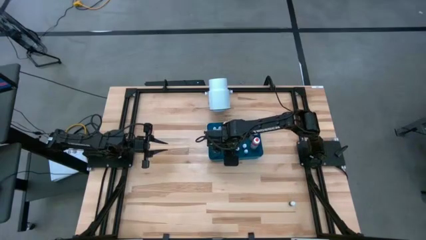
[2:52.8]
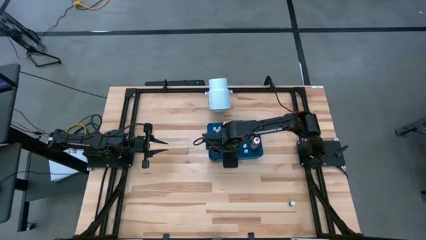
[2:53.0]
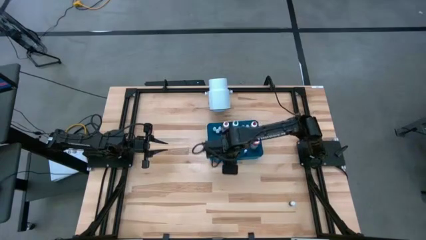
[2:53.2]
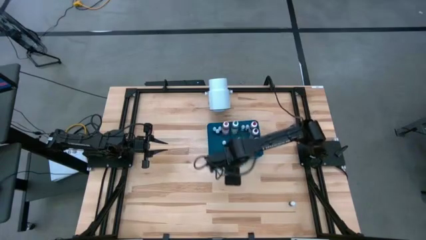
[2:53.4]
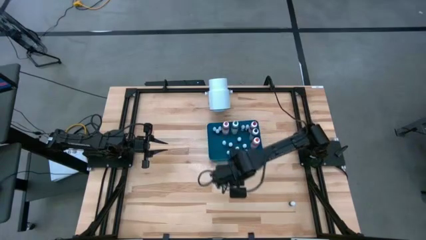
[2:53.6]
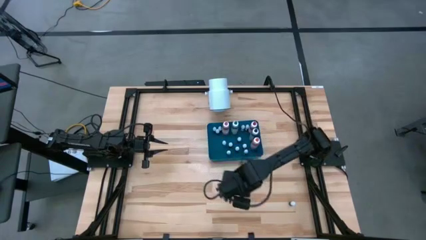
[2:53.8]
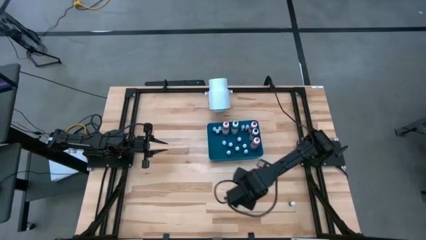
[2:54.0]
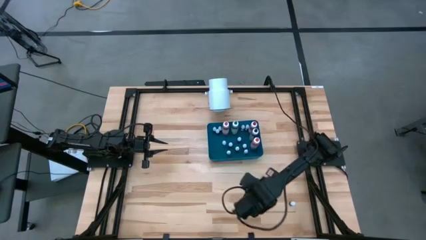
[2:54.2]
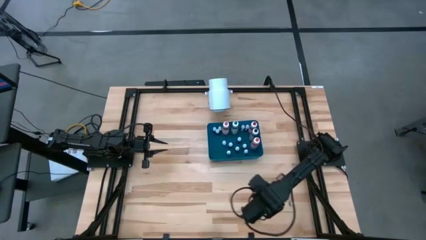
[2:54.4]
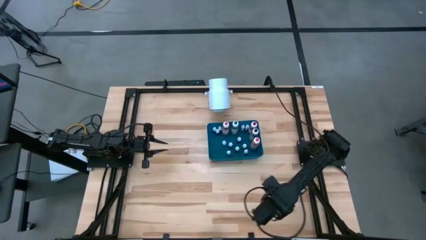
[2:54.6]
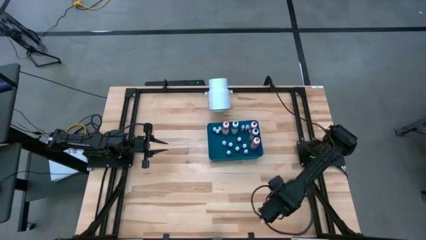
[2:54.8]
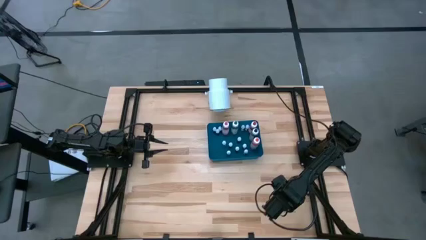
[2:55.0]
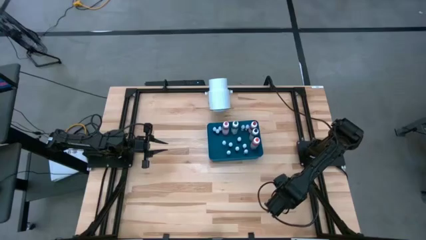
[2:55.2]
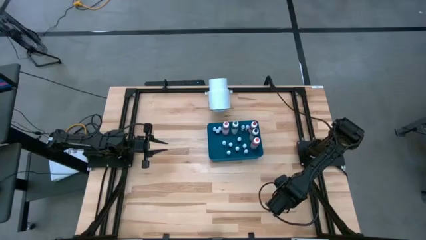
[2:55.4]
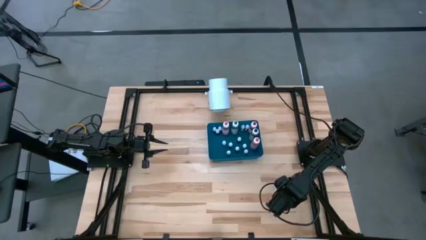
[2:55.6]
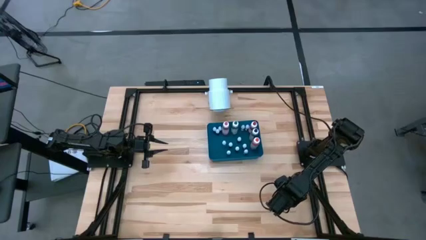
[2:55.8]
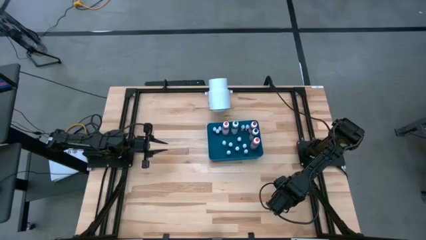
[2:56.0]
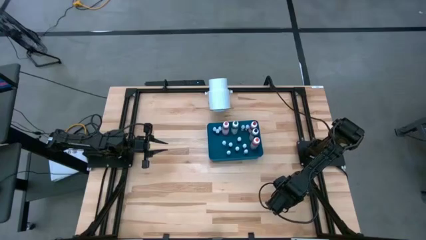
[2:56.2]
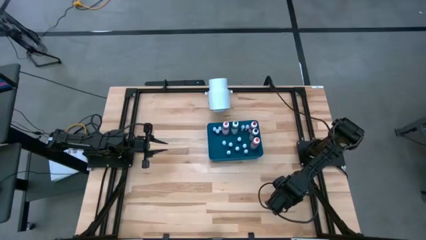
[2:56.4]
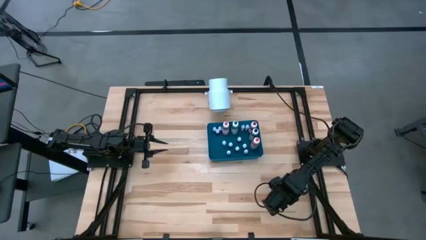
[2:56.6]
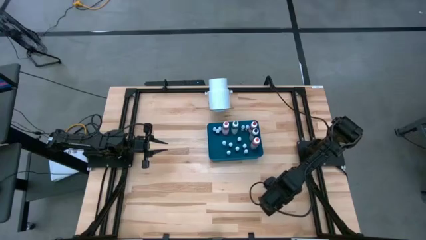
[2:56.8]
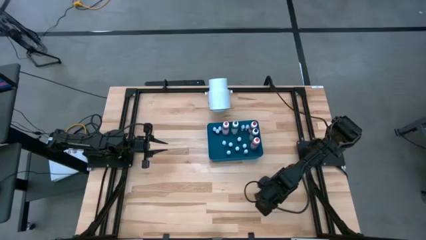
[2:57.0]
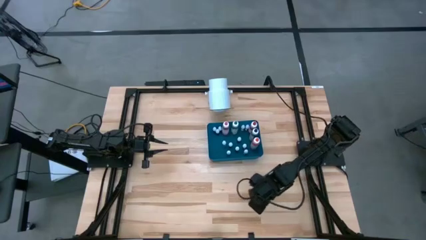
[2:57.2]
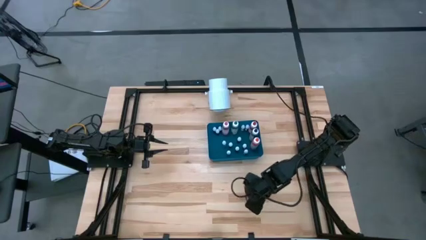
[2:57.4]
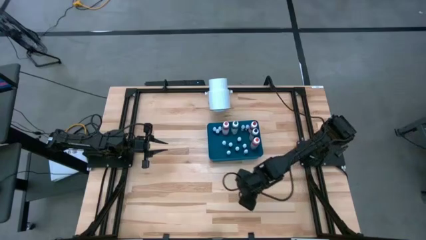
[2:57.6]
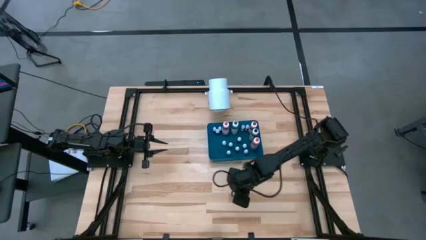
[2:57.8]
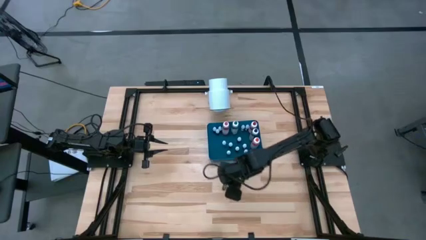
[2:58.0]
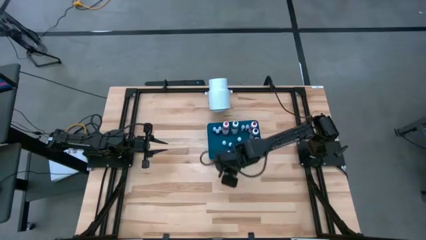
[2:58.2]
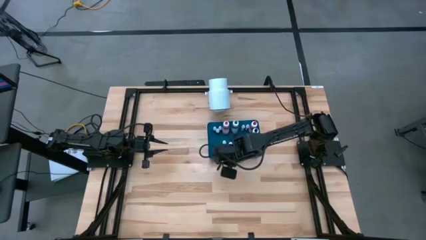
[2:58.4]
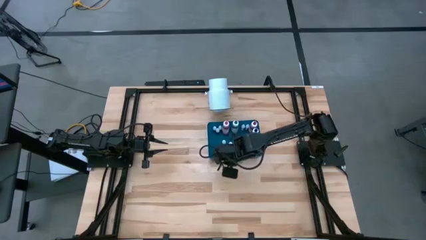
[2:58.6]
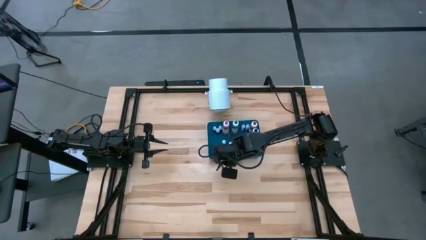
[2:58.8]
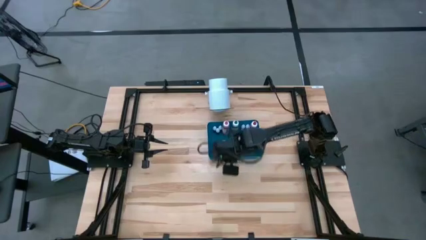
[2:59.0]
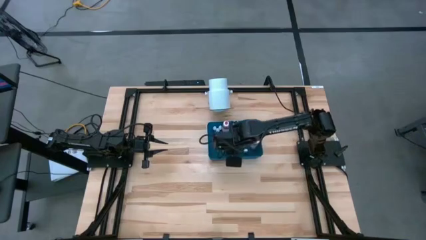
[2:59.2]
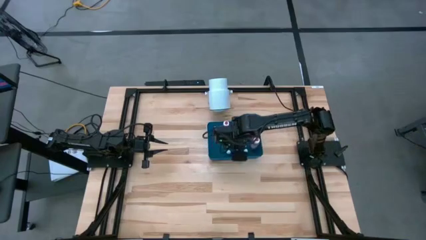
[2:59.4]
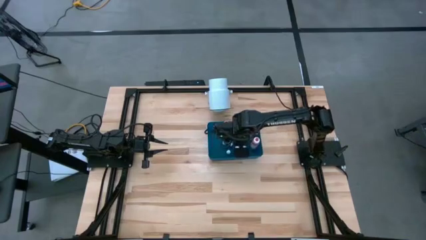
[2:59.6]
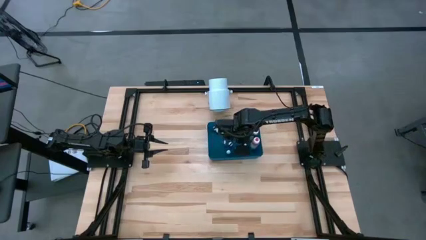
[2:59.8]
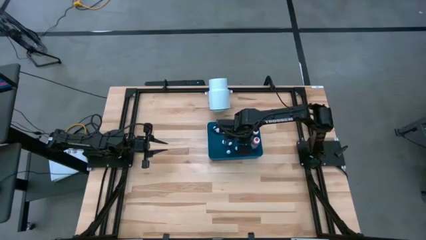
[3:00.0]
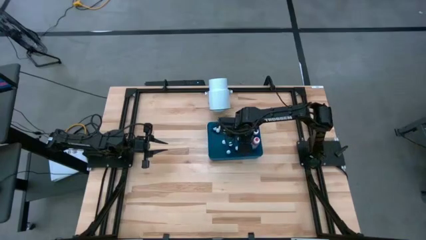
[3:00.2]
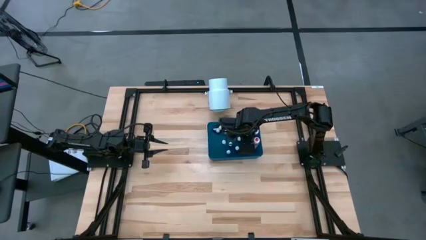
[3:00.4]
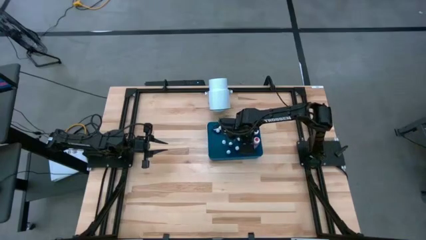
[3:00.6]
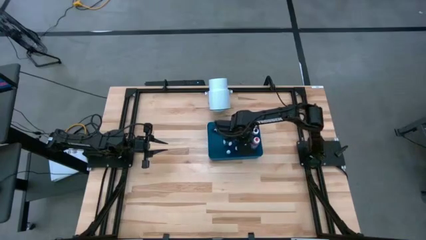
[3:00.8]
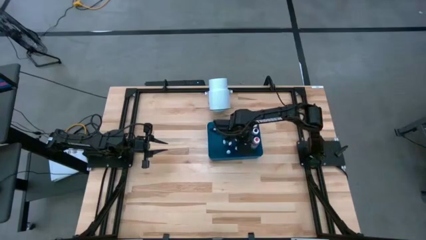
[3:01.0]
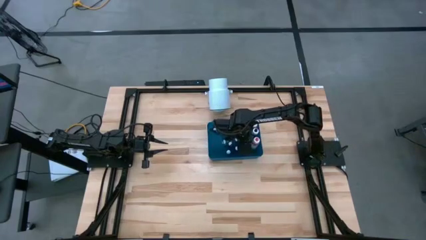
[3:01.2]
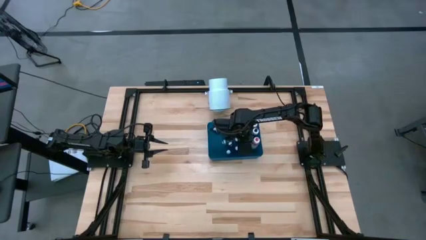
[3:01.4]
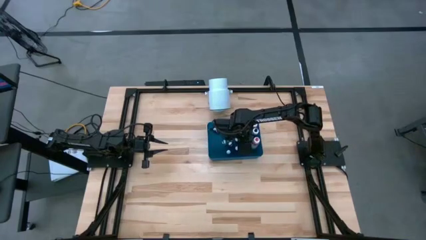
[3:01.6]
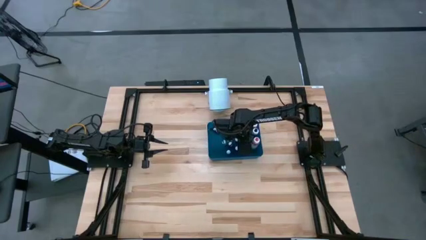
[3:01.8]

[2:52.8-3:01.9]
Task: Pick & Place food coloring
Put the small black food coloring bottle into the blue bin

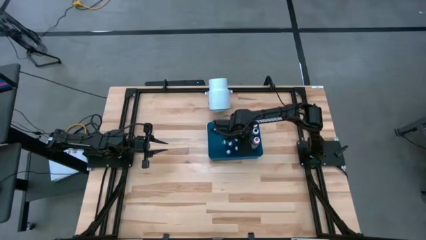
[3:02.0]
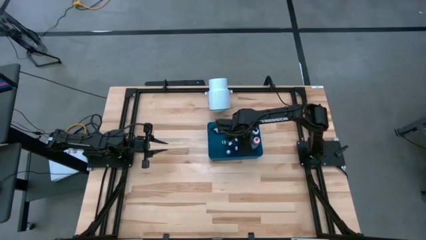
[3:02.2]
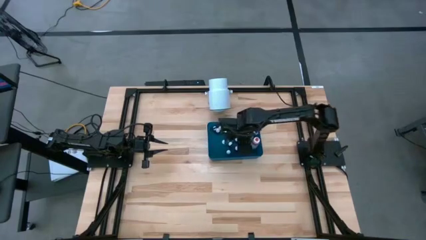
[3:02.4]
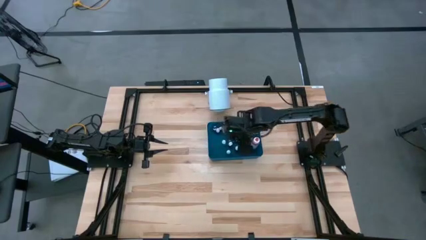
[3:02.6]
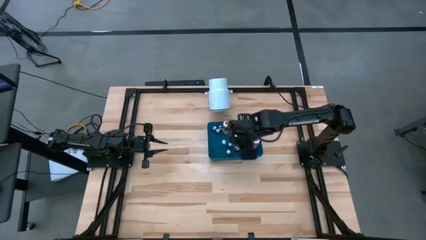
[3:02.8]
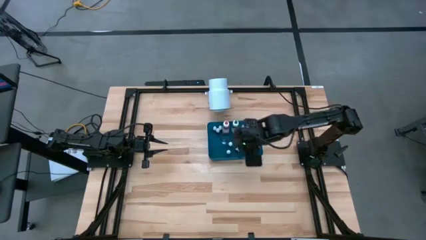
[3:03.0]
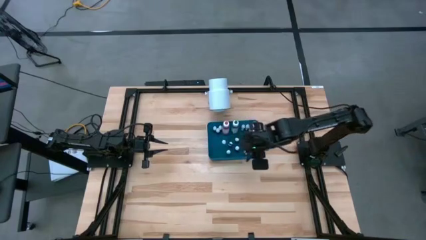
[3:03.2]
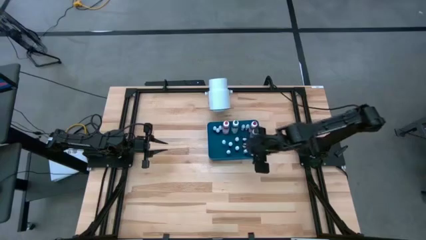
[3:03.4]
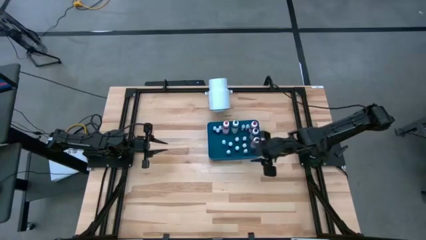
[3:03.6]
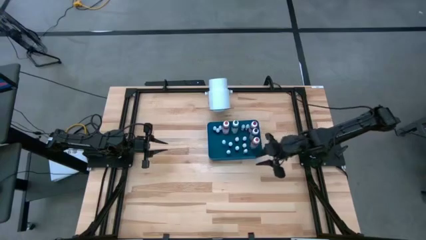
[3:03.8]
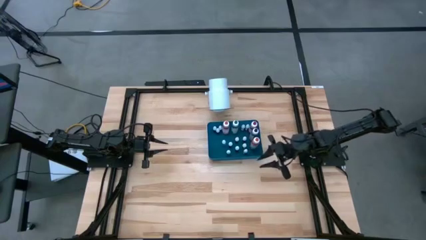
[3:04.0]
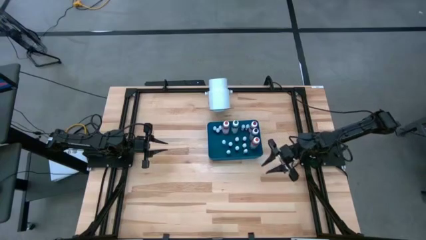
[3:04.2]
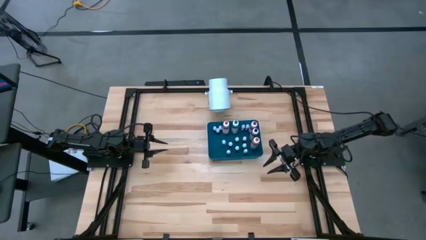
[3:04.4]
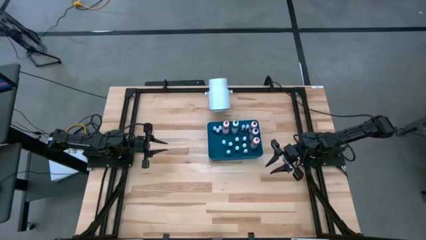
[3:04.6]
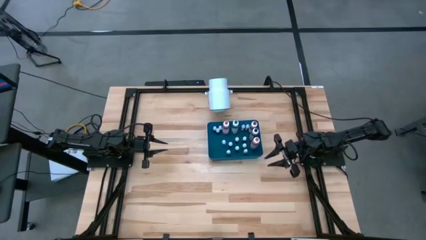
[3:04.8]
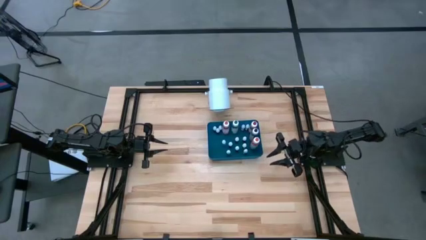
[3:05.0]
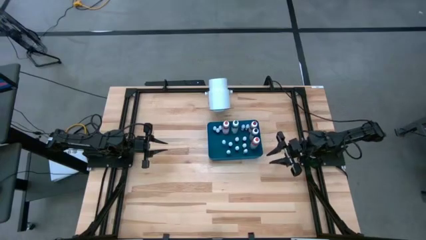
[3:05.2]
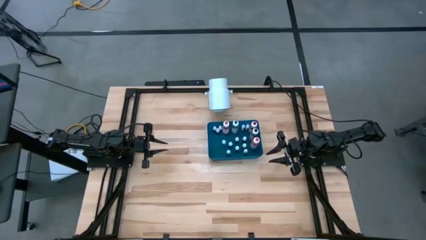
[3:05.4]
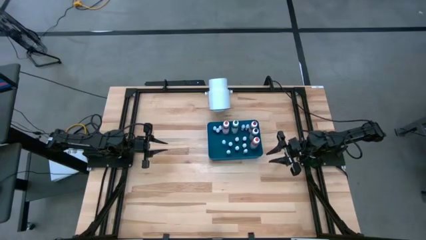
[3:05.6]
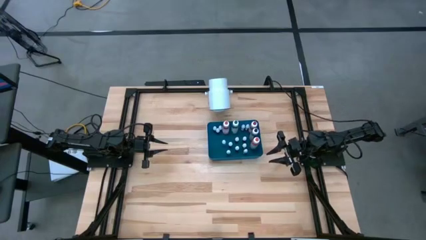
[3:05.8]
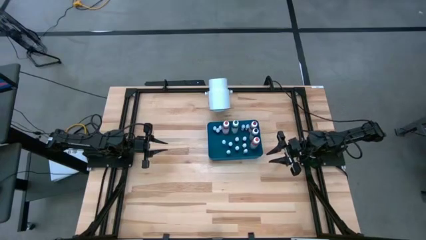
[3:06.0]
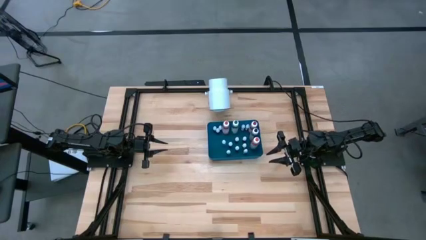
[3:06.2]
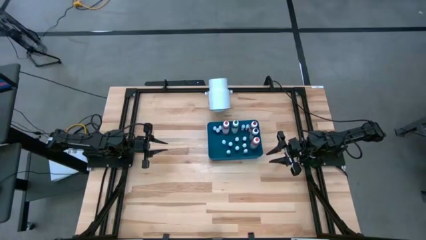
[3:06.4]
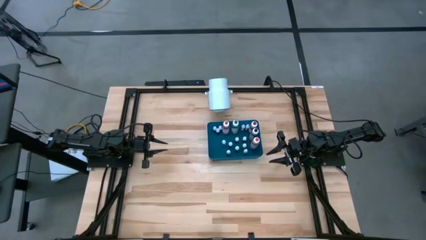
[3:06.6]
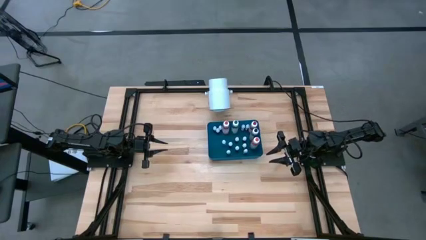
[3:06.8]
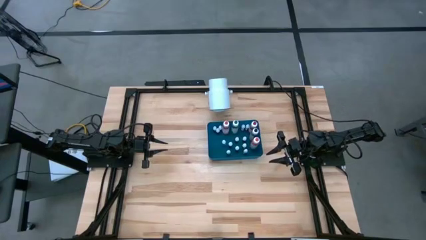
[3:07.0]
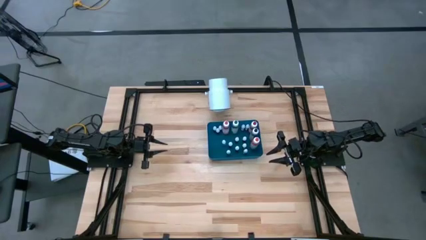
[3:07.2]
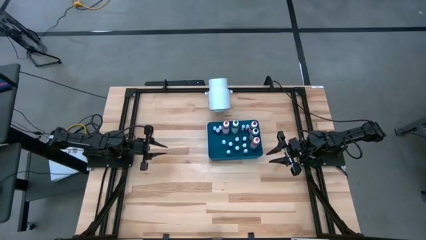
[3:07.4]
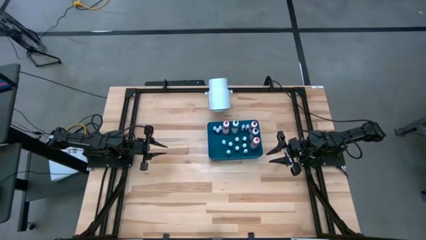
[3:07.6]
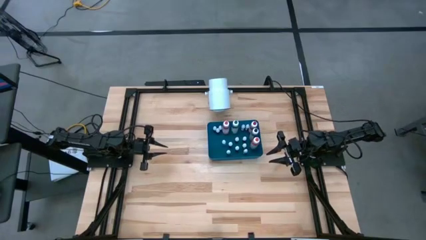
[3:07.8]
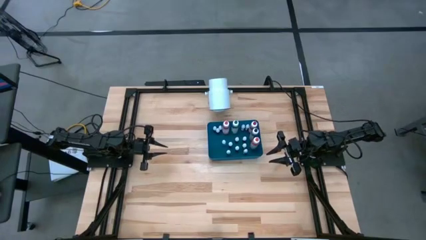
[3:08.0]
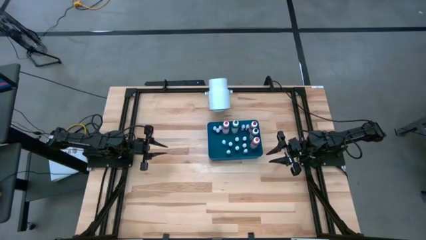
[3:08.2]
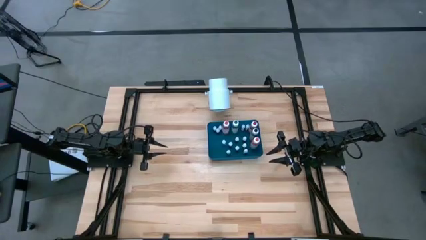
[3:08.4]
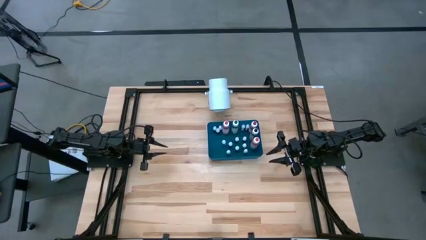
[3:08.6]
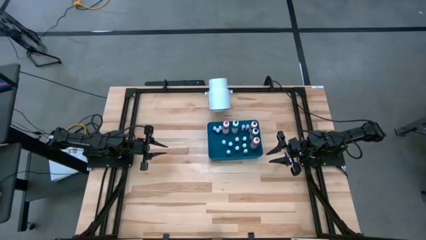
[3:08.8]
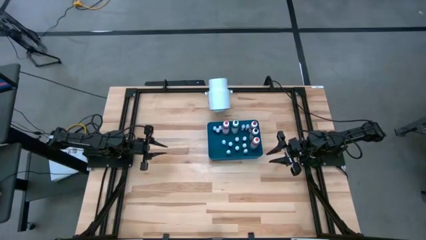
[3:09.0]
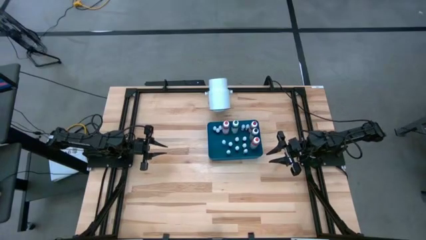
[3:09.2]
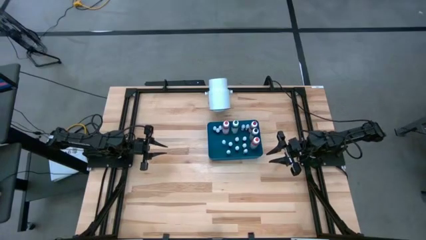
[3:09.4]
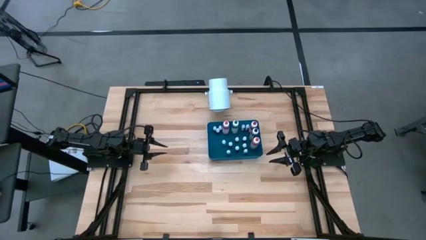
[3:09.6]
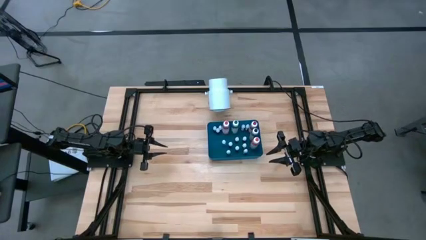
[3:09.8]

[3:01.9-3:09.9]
Return to Home Position
